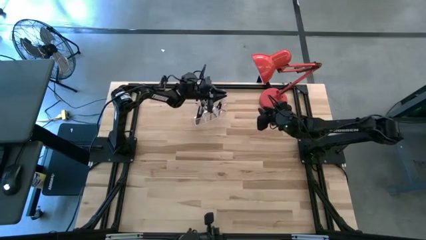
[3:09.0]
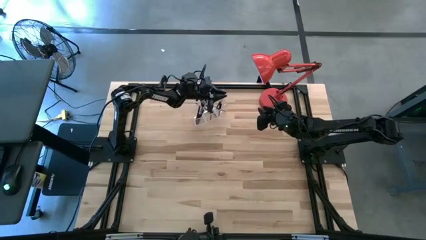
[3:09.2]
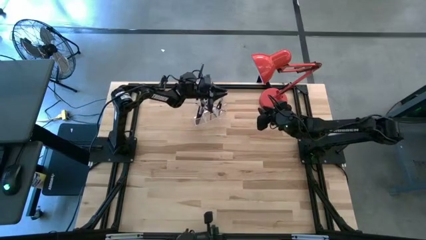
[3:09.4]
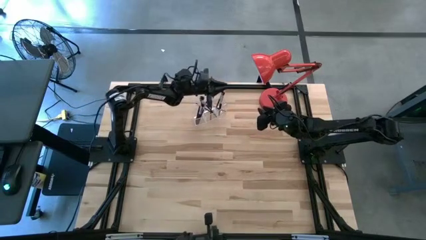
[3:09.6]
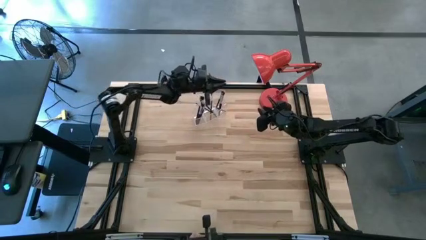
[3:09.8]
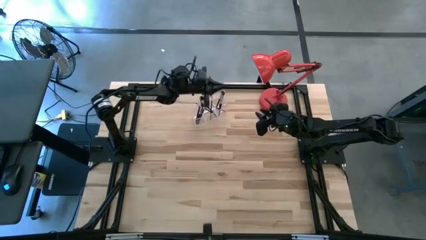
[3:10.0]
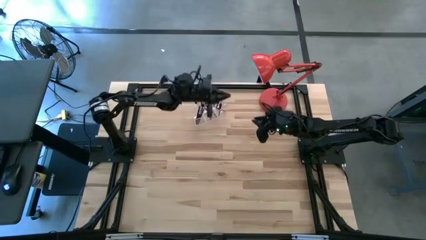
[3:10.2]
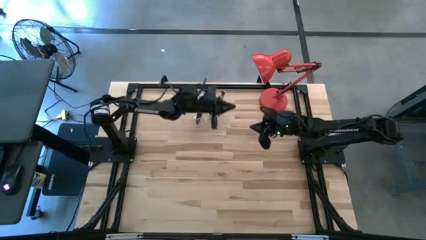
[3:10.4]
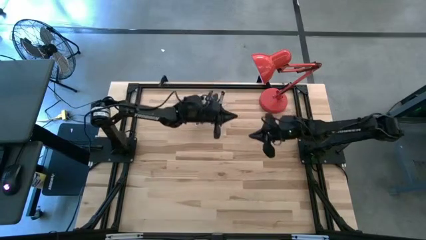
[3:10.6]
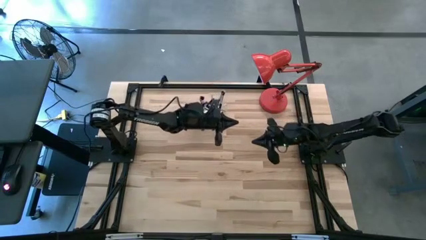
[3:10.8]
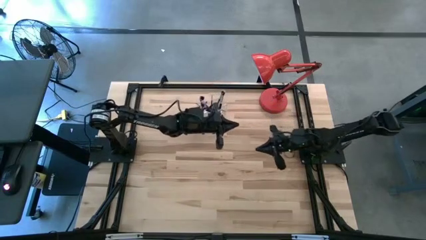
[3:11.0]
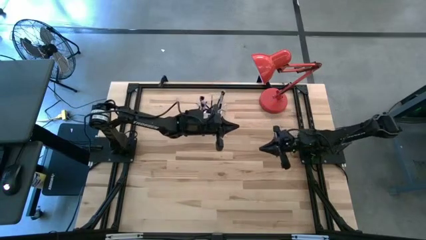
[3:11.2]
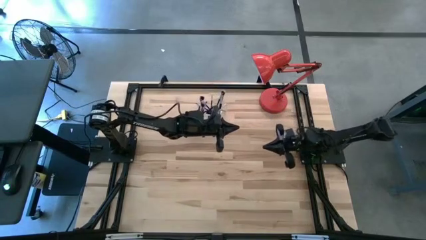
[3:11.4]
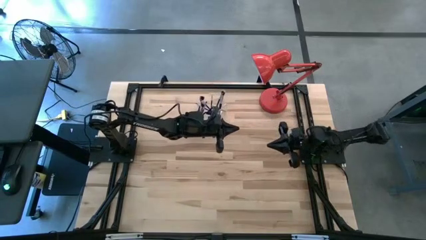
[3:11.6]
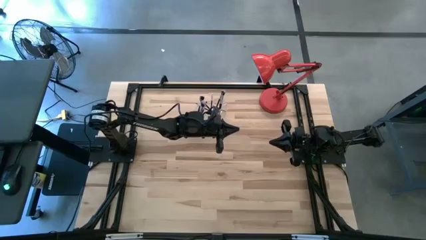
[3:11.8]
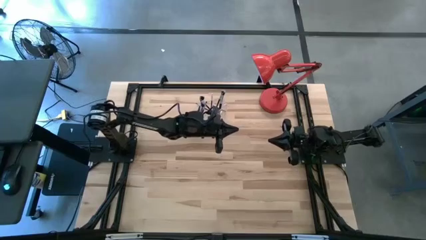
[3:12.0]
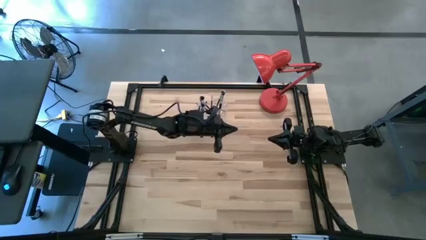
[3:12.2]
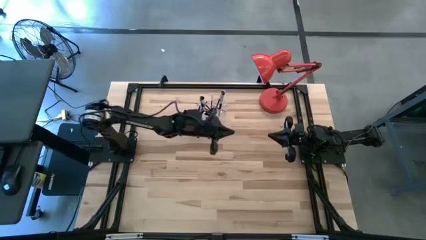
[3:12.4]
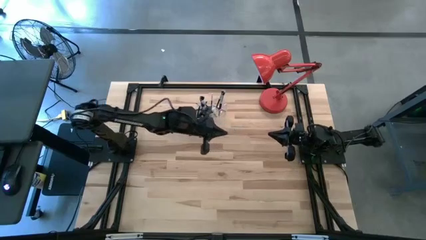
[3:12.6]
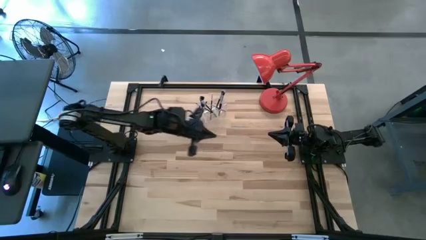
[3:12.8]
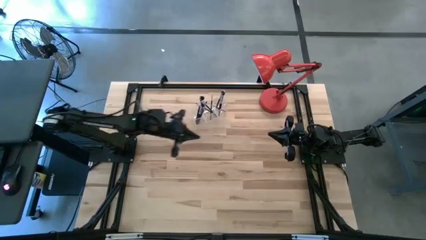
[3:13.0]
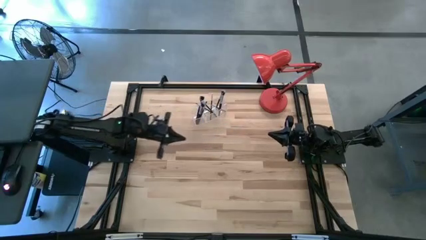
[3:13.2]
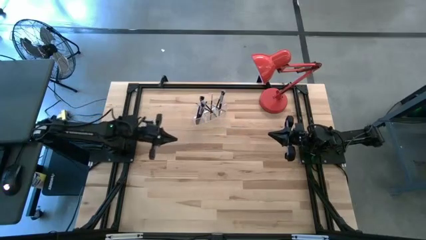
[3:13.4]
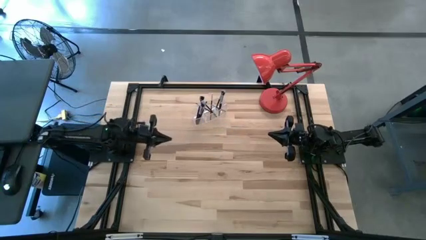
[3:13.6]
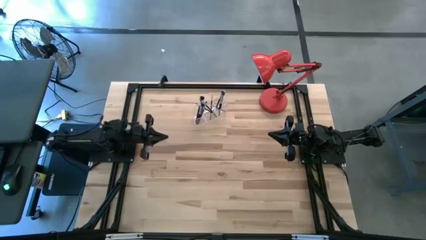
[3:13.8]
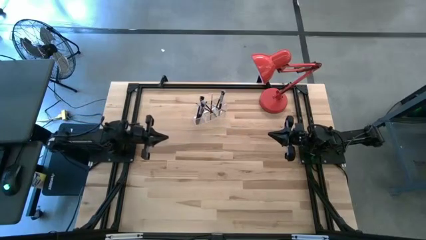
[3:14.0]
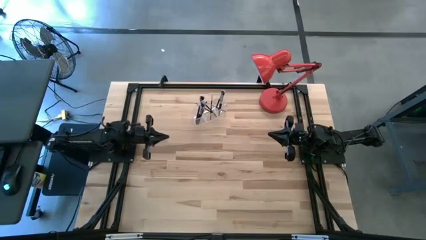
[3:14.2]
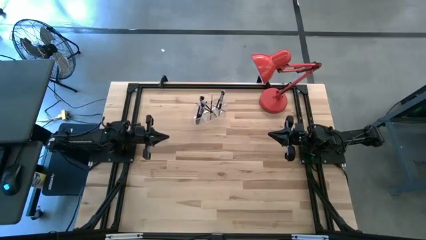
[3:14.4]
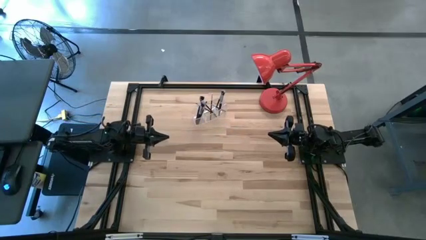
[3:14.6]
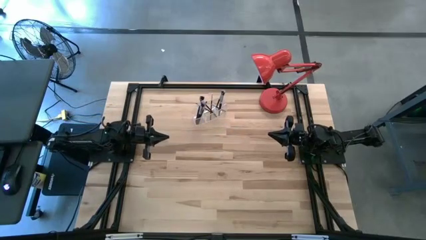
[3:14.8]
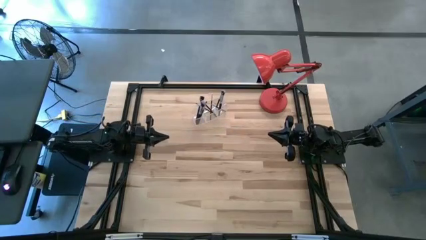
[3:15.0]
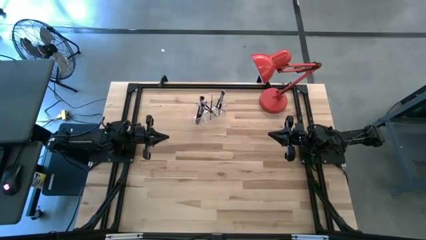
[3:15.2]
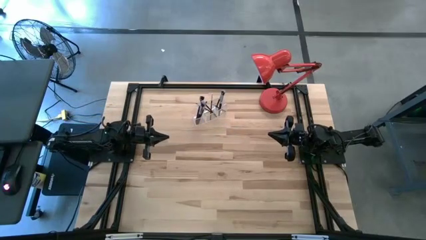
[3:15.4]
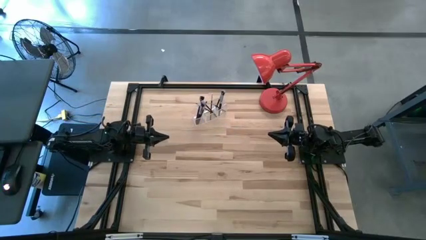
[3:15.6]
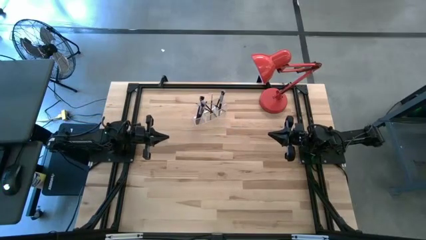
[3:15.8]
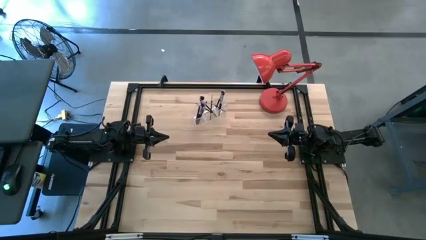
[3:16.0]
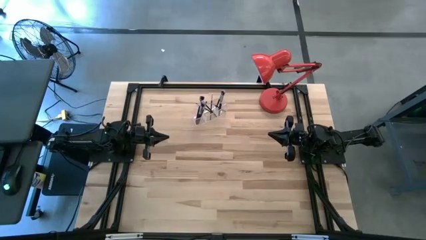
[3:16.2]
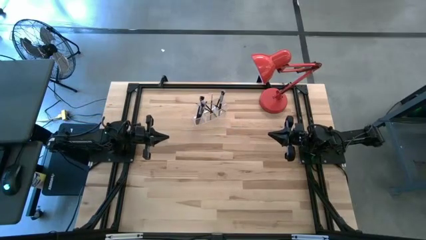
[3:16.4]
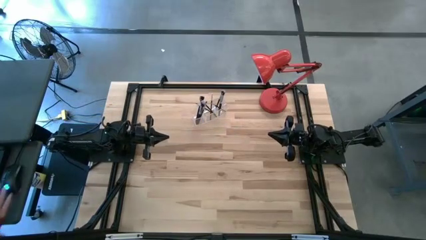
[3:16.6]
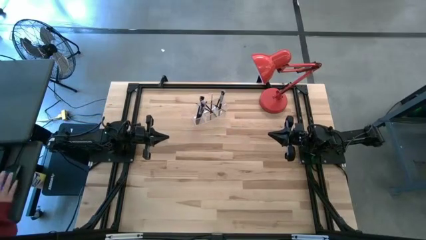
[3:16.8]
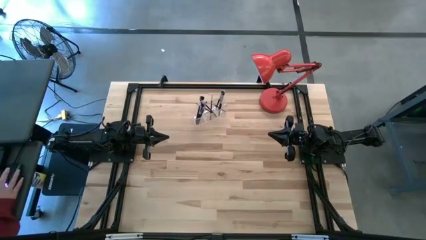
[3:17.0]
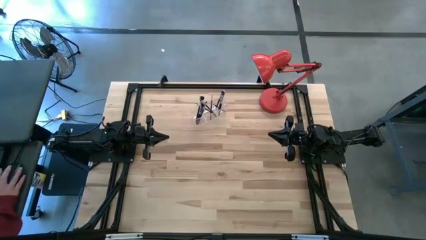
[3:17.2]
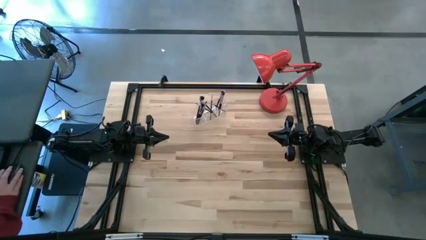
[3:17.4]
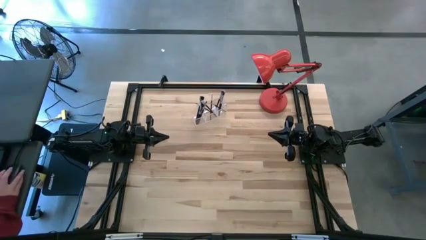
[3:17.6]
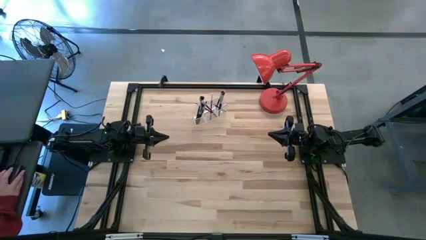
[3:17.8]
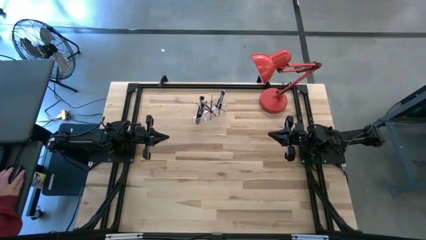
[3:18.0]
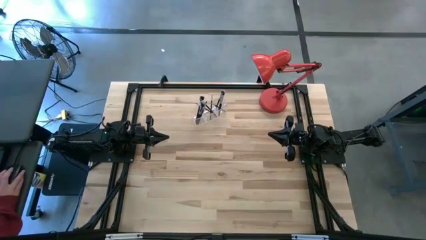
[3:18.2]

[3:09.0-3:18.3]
Task: Put items in baskets/containers
Return to Home Position

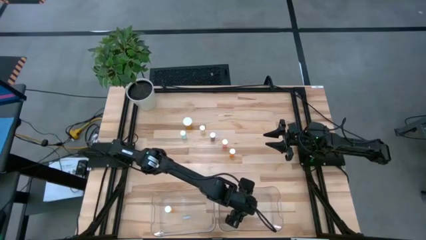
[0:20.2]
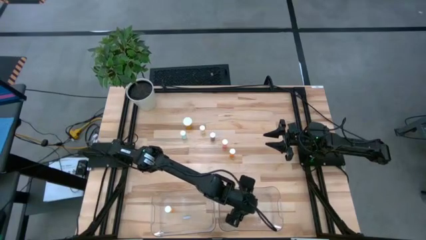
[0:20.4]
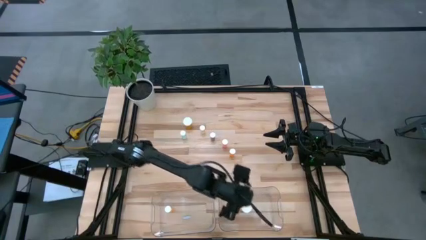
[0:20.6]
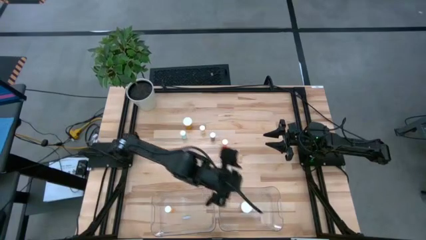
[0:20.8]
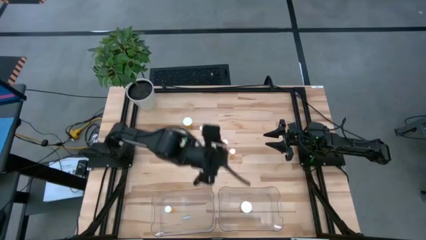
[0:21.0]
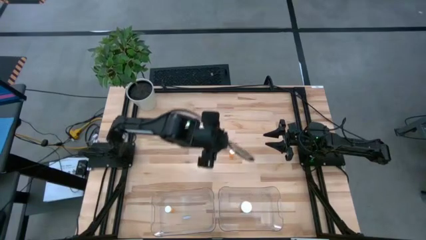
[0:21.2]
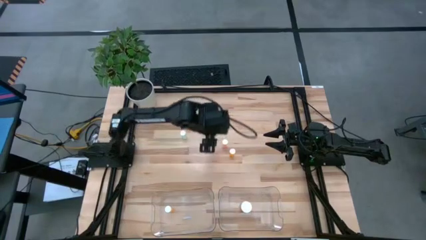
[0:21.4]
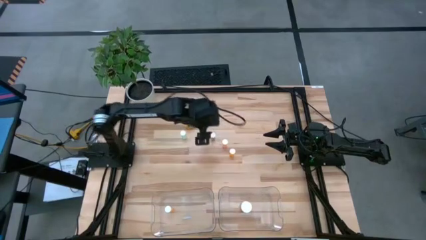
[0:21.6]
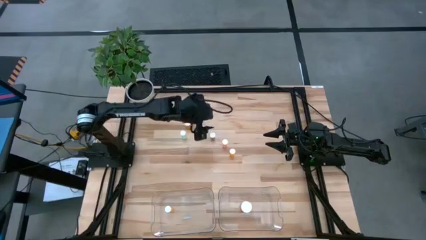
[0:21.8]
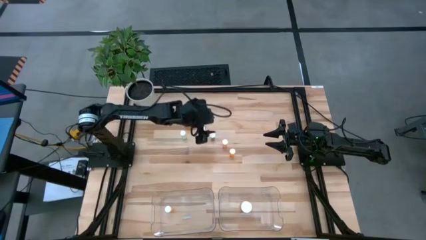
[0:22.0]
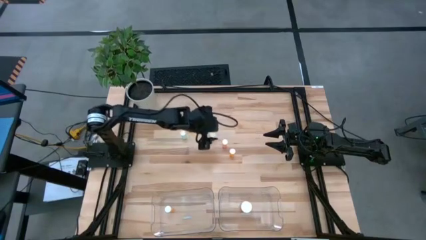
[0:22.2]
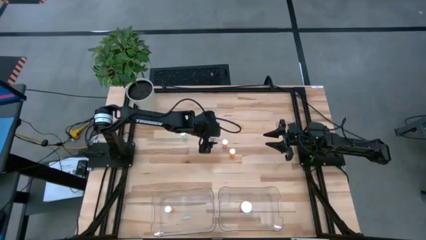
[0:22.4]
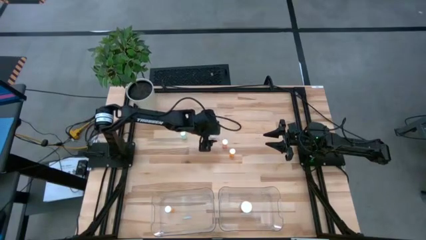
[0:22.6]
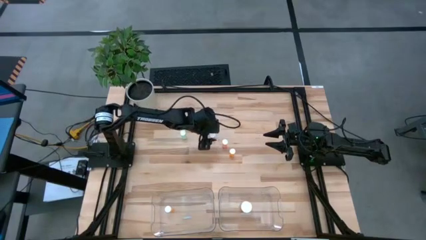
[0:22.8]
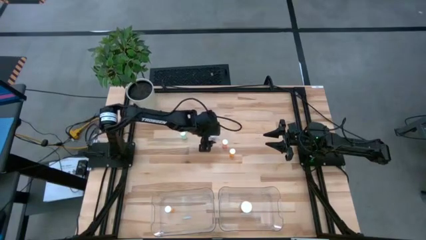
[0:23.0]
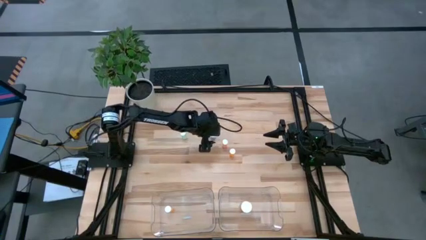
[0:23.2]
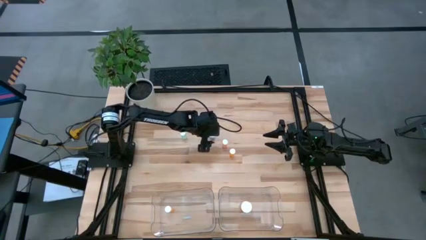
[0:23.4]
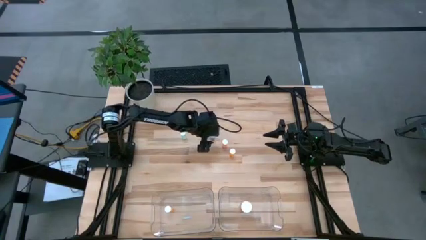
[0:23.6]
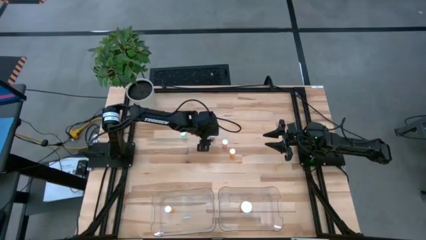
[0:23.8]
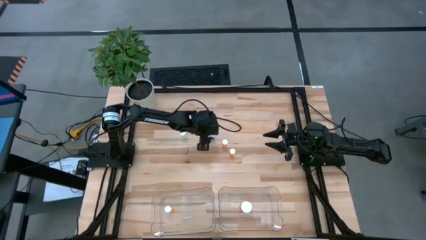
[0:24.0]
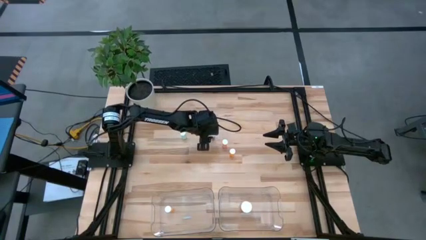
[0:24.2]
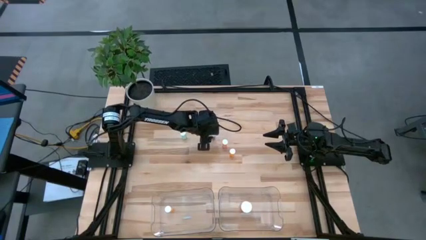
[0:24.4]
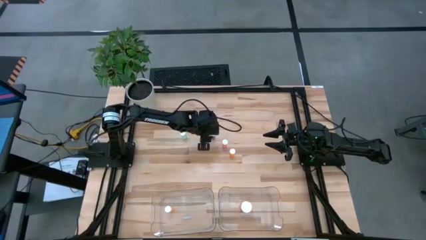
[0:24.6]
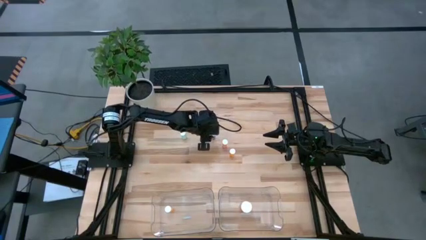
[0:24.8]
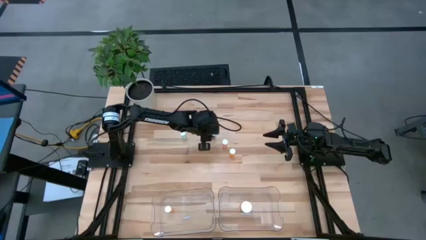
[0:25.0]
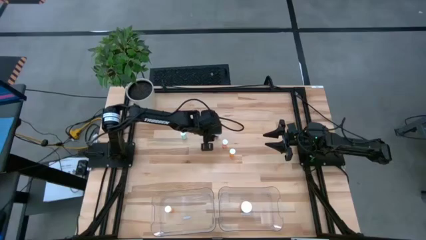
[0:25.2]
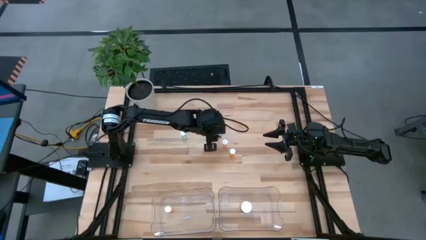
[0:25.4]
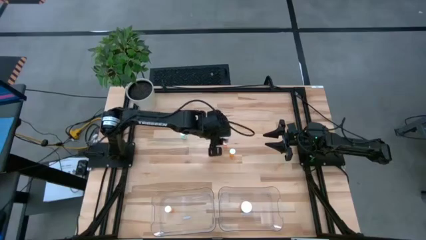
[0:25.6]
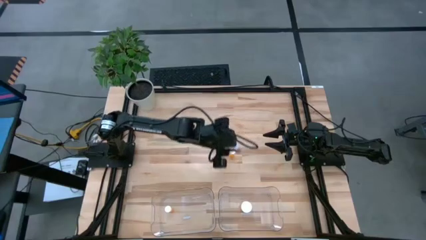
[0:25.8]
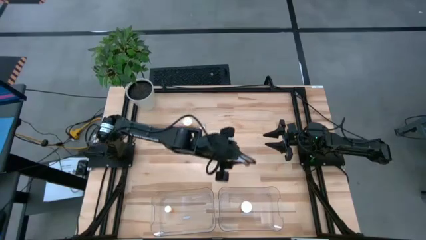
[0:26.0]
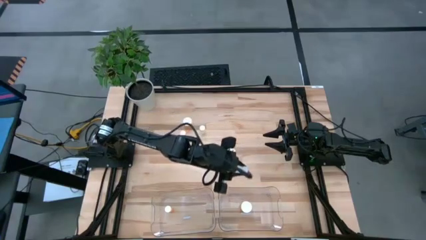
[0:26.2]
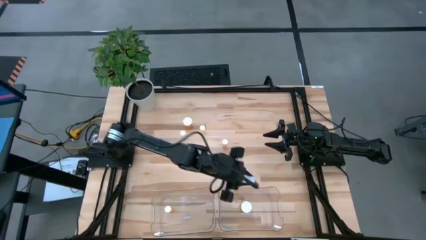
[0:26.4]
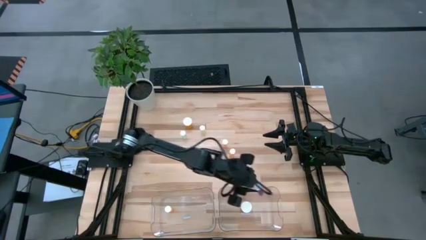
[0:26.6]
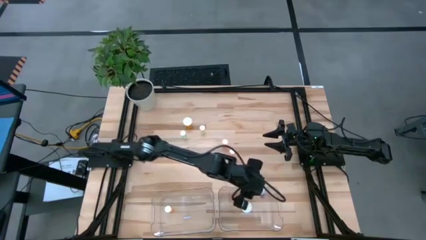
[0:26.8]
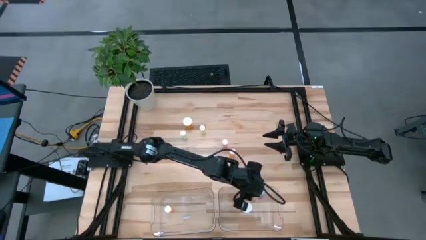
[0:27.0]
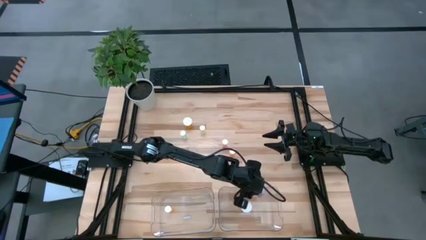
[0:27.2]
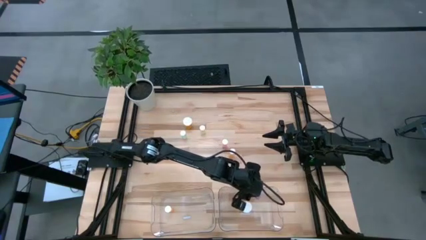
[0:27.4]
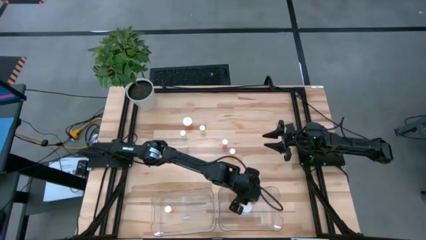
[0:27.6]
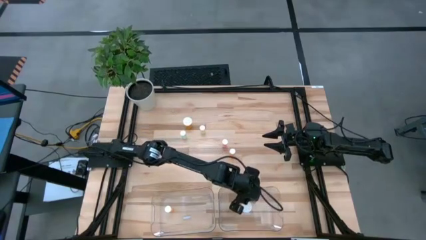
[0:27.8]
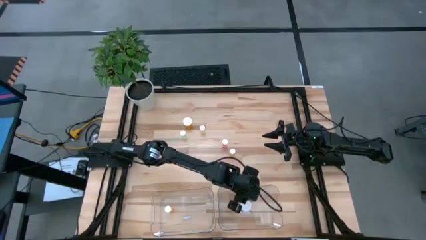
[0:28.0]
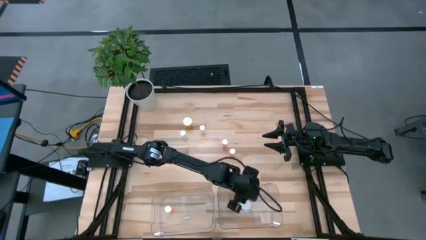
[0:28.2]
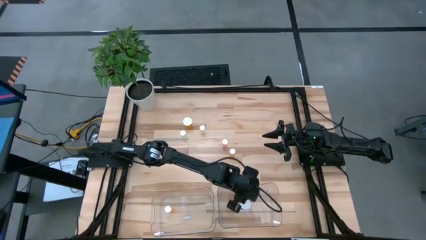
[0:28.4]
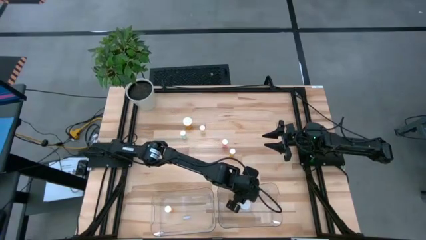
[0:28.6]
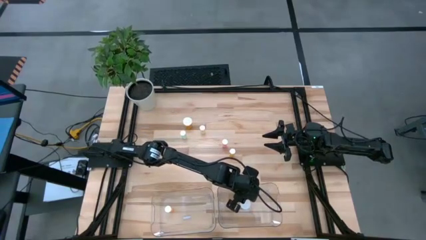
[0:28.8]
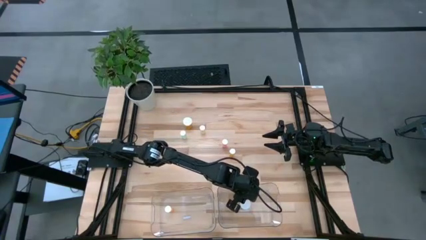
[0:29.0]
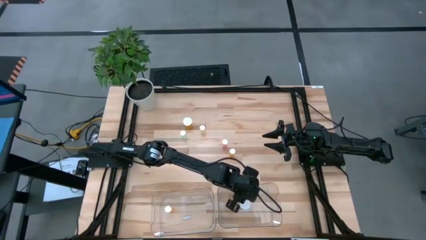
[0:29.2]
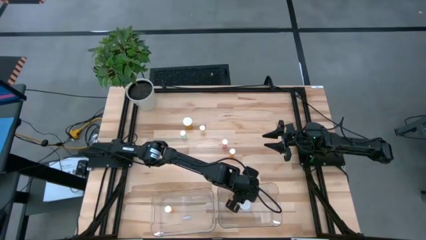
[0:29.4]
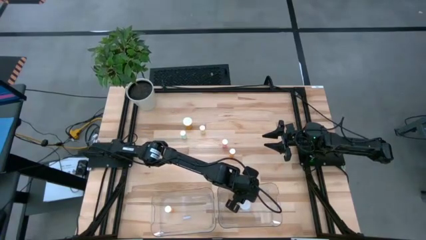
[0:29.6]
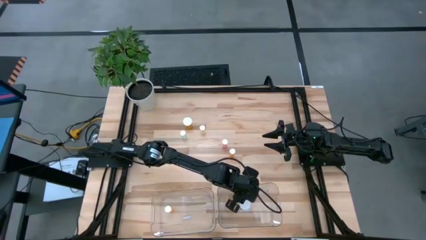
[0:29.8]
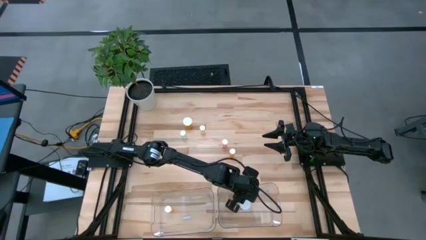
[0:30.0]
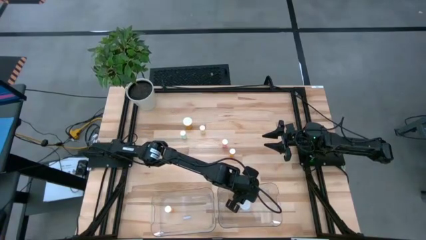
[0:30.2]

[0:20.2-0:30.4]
Task: Pick and place medicine bottles into bin by pill shape (circle, oval)
Put the blue capsule bottle into the right transparent bin
